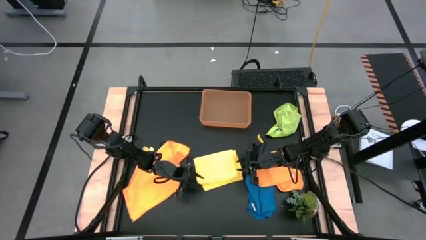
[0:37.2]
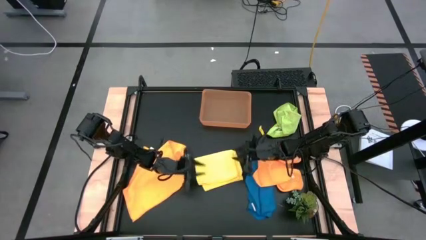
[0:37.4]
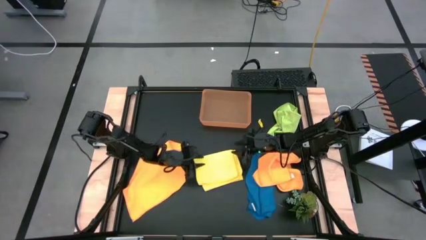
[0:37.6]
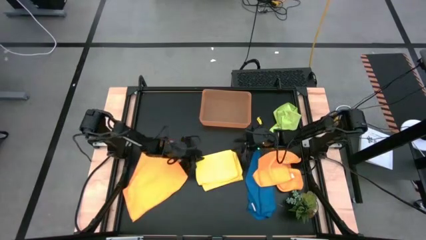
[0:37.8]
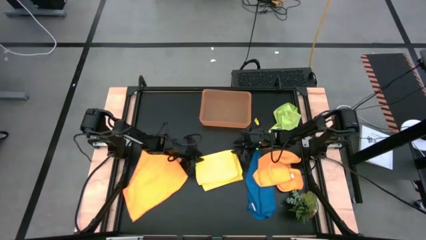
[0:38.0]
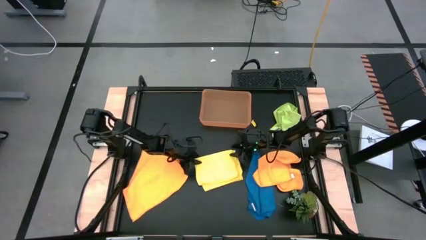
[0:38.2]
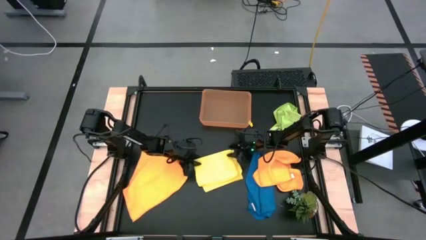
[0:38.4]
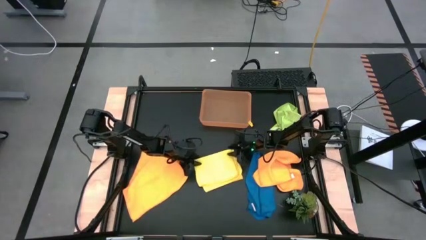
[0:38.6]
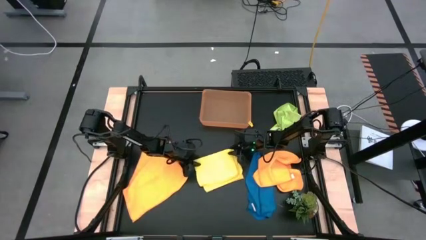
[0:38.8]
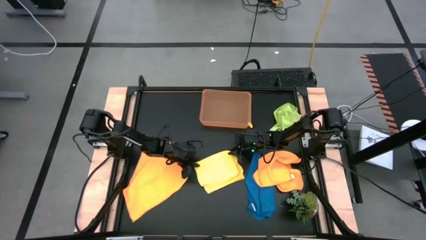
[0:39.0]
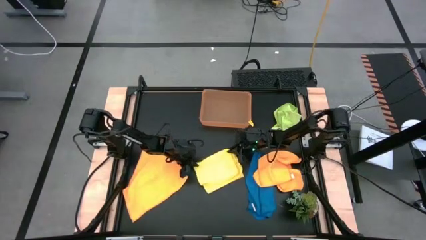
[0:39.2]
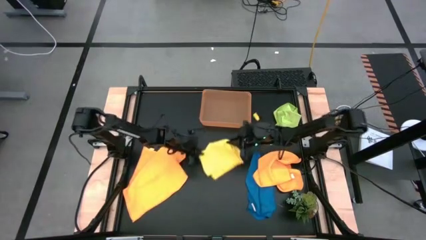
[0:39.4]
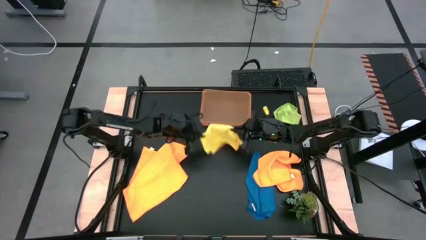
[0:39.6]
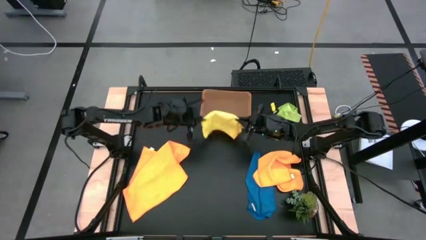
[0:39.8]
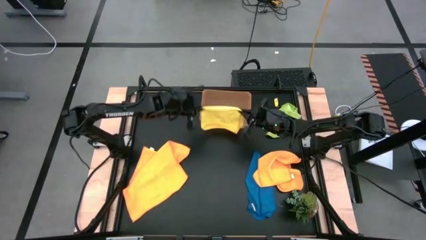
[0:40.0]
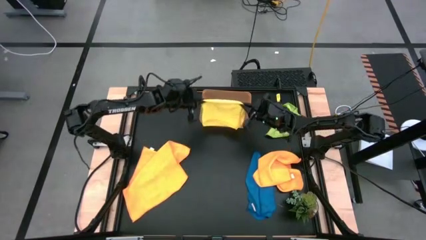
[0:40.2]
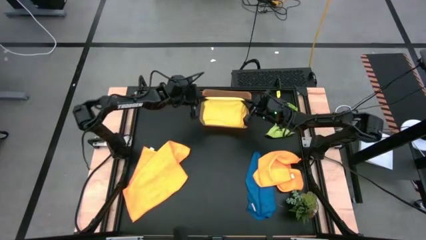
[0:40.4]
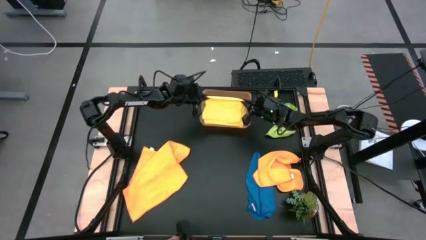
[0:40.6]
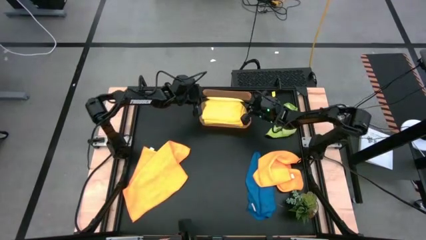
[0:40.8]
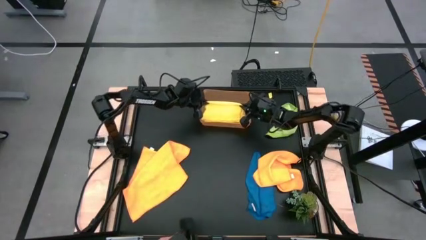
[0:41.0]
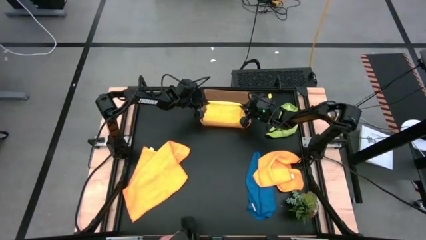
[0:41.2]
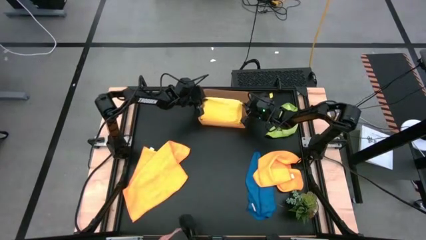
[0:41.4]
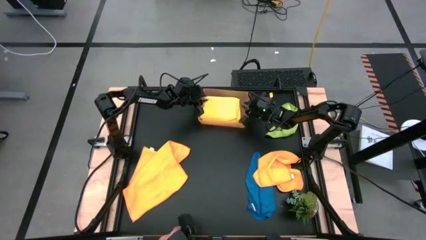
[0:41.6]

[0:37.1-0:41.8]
Task: Fold microfiber towels
Put the yellow towel in the orange bin

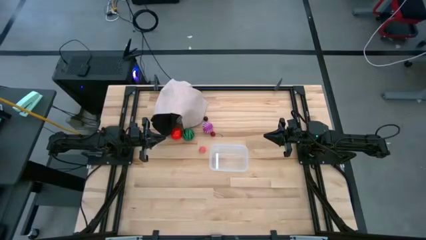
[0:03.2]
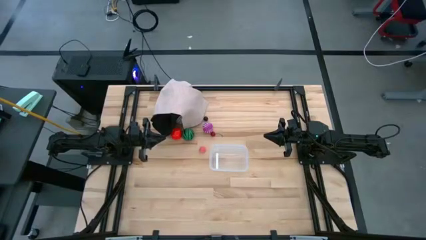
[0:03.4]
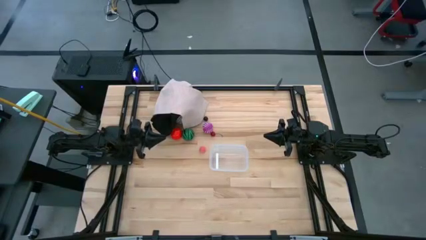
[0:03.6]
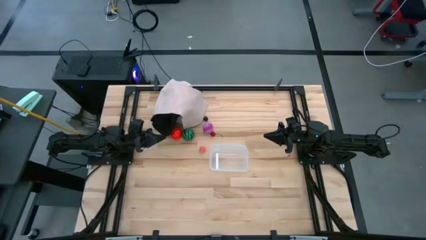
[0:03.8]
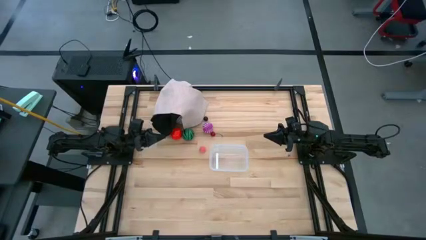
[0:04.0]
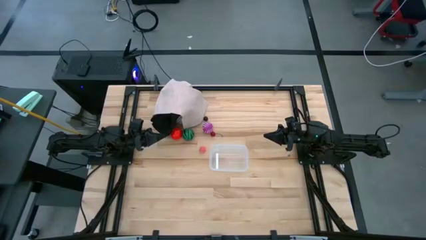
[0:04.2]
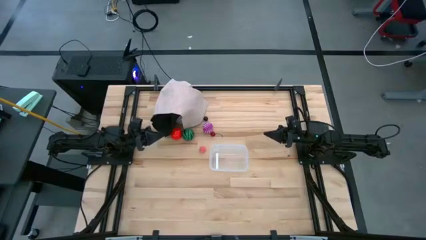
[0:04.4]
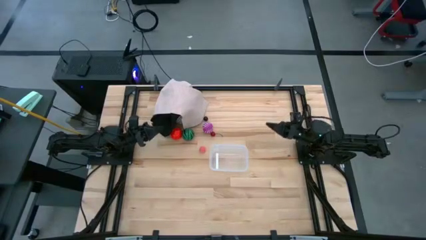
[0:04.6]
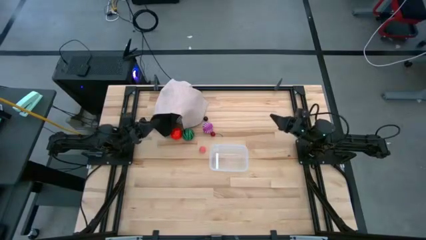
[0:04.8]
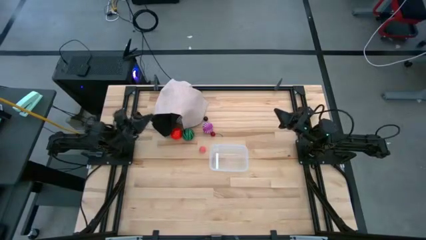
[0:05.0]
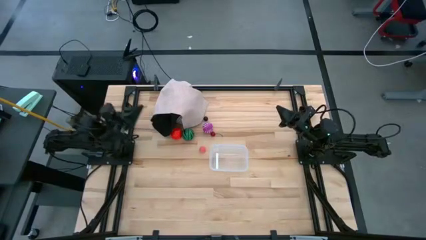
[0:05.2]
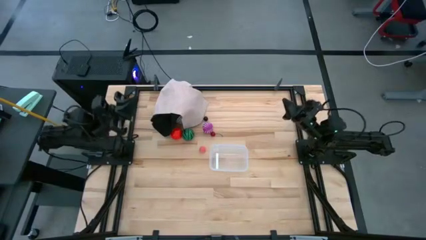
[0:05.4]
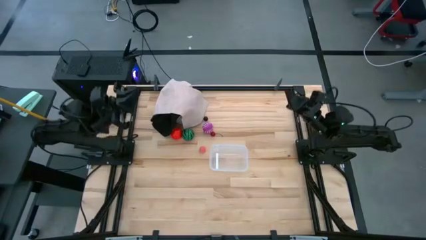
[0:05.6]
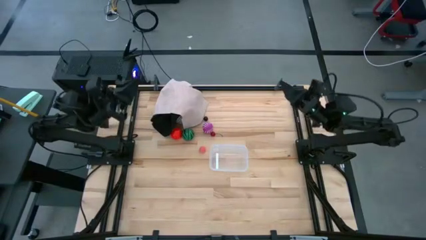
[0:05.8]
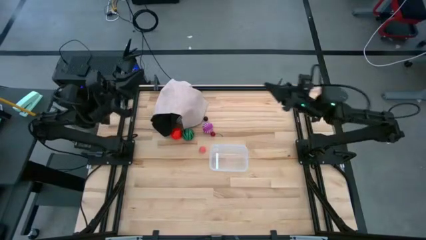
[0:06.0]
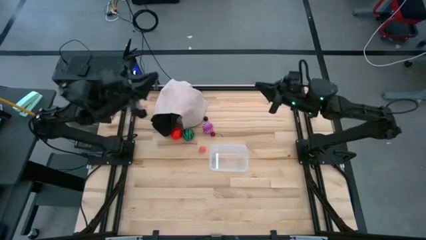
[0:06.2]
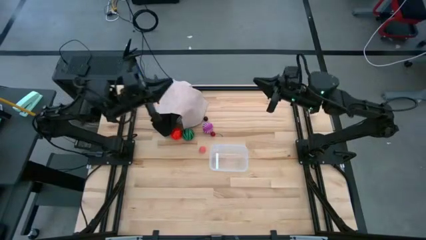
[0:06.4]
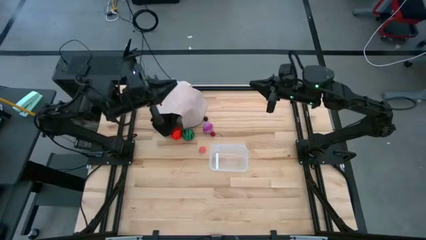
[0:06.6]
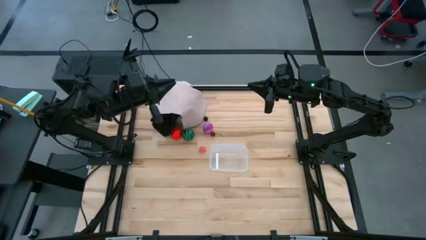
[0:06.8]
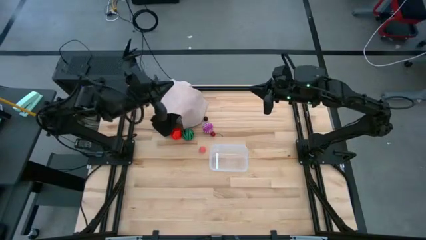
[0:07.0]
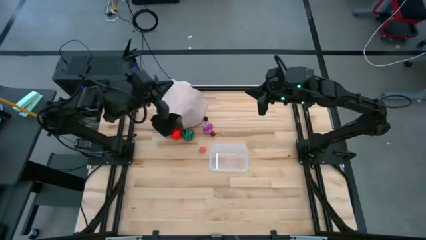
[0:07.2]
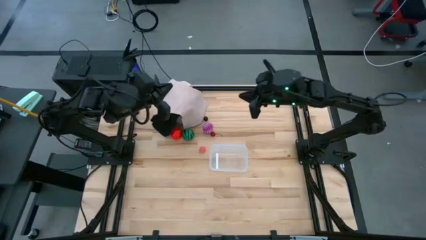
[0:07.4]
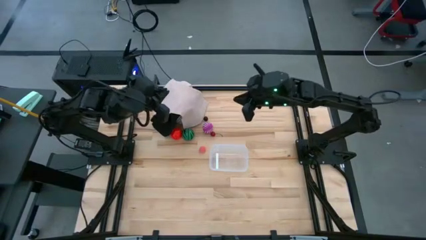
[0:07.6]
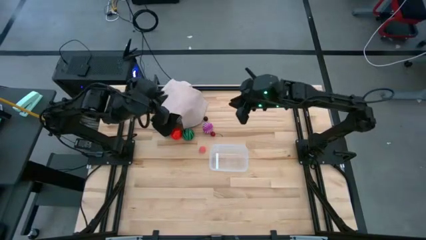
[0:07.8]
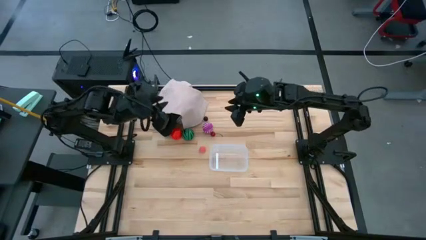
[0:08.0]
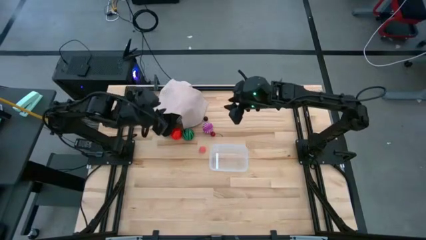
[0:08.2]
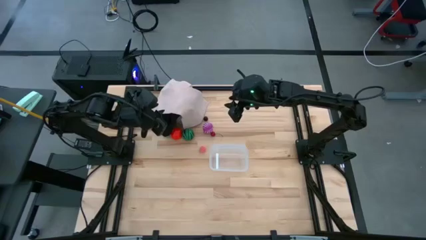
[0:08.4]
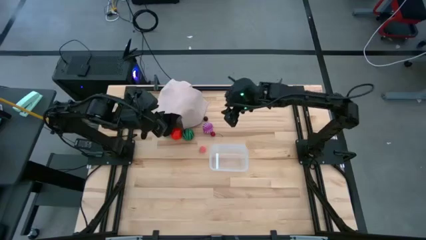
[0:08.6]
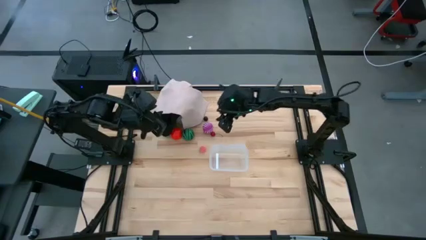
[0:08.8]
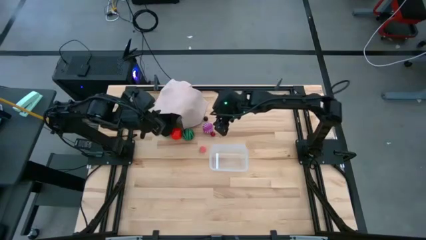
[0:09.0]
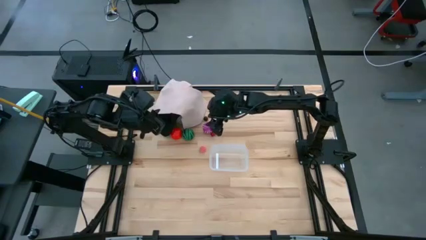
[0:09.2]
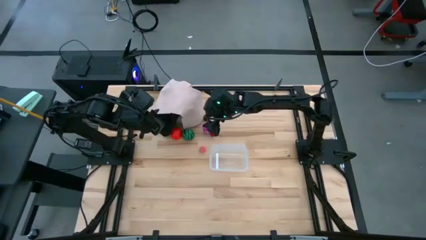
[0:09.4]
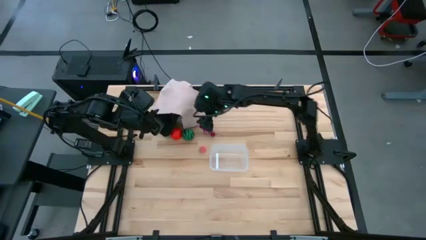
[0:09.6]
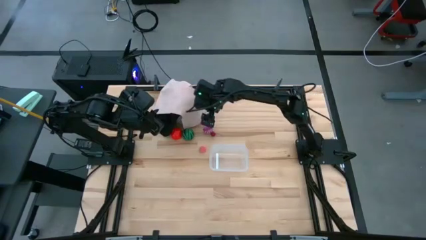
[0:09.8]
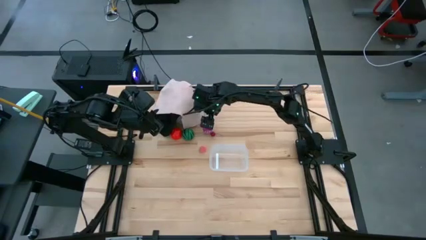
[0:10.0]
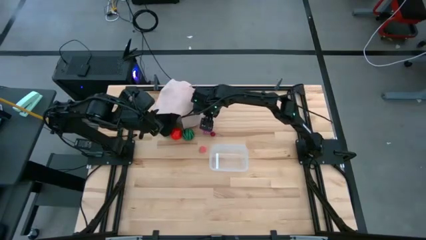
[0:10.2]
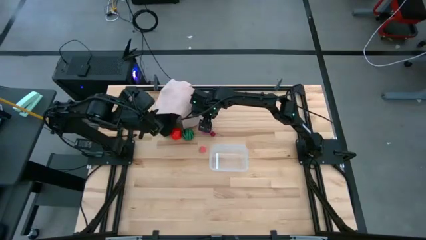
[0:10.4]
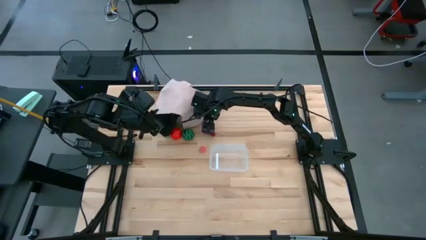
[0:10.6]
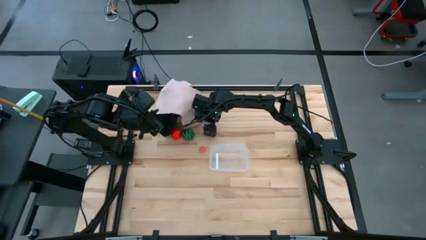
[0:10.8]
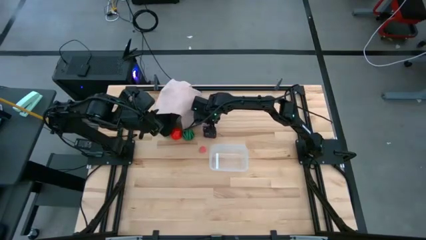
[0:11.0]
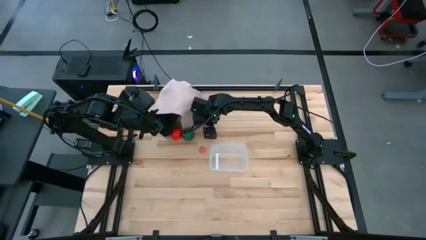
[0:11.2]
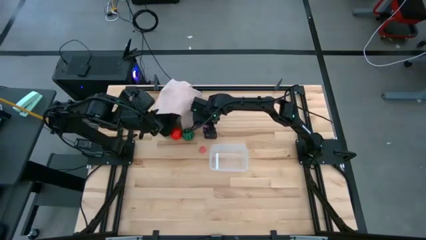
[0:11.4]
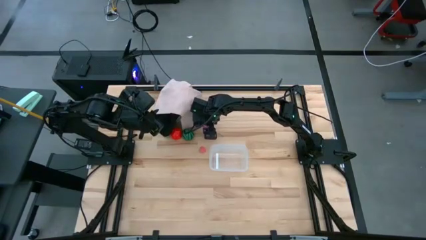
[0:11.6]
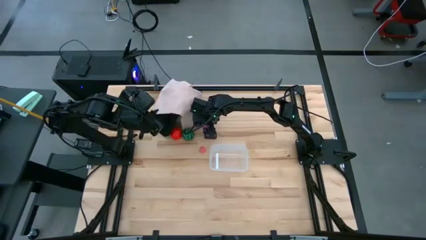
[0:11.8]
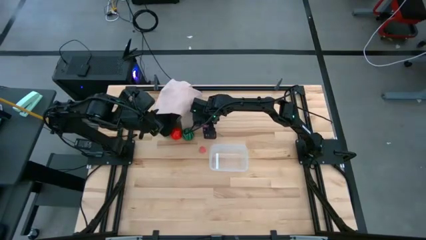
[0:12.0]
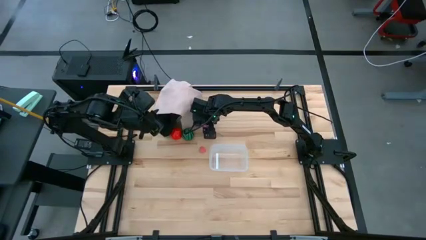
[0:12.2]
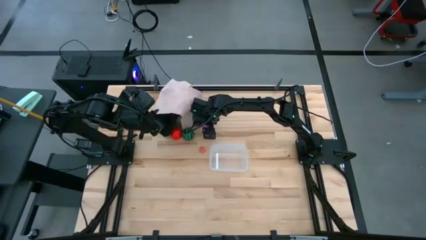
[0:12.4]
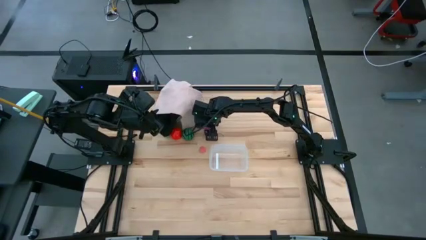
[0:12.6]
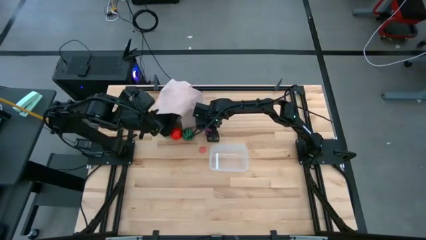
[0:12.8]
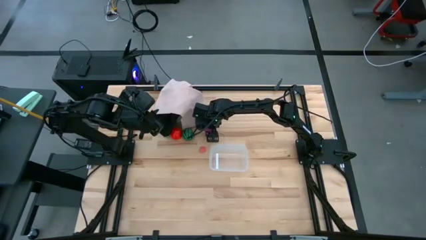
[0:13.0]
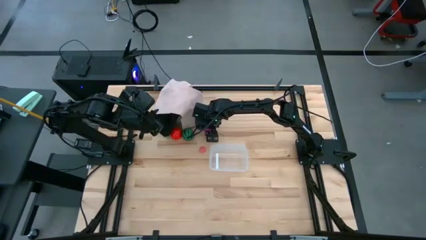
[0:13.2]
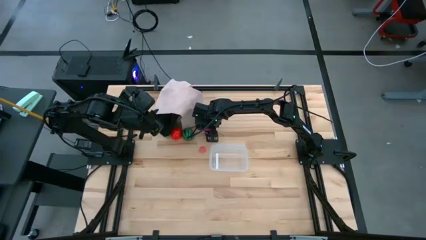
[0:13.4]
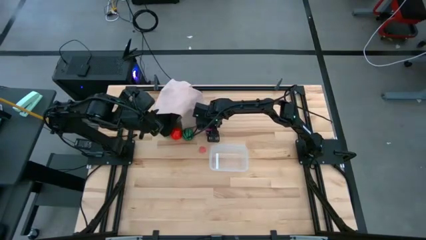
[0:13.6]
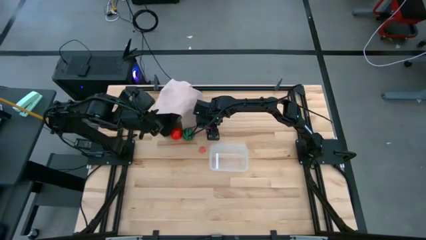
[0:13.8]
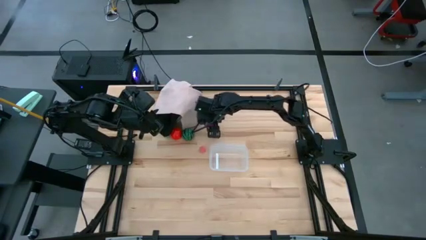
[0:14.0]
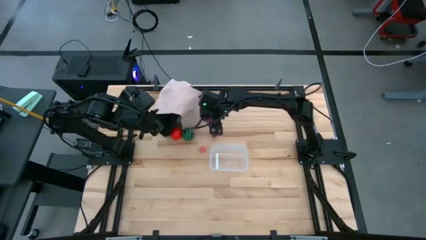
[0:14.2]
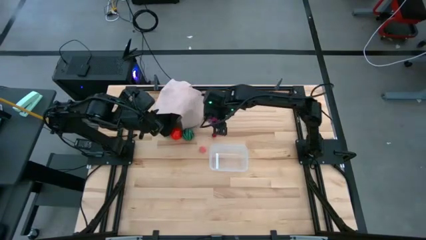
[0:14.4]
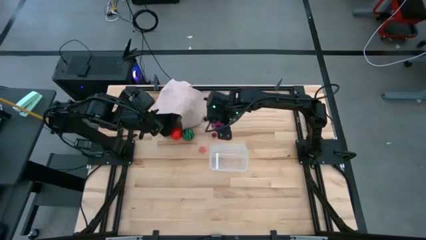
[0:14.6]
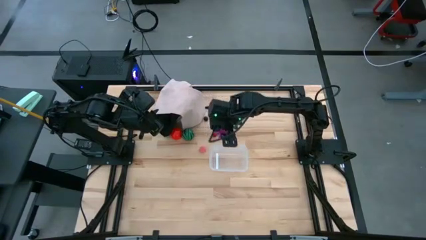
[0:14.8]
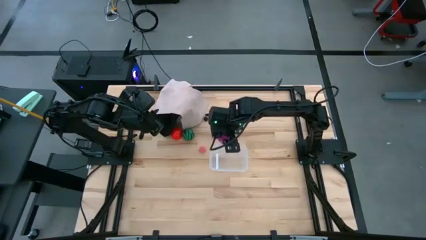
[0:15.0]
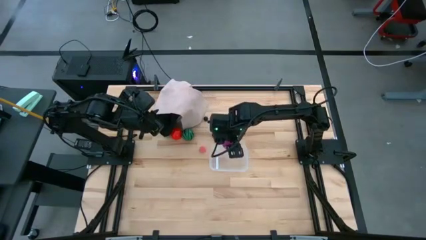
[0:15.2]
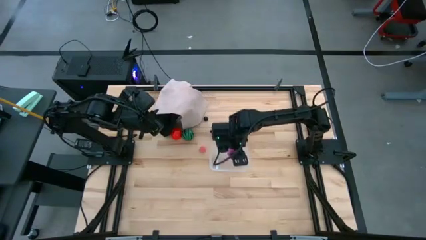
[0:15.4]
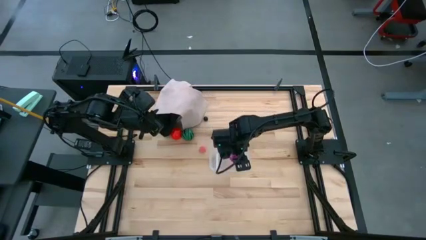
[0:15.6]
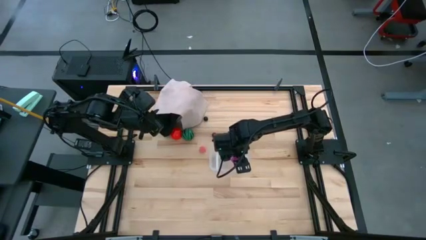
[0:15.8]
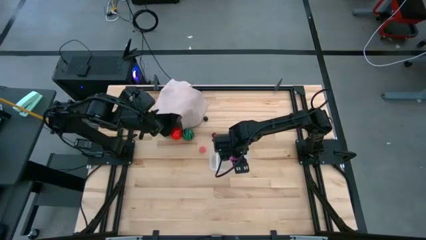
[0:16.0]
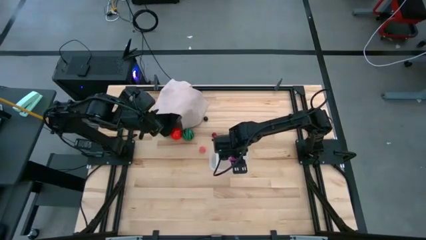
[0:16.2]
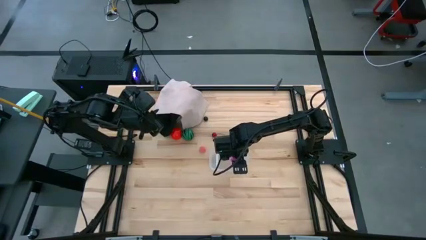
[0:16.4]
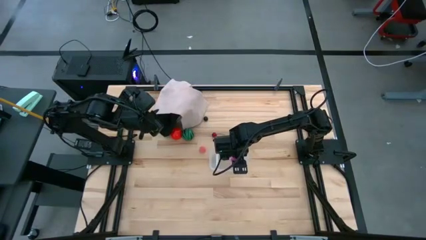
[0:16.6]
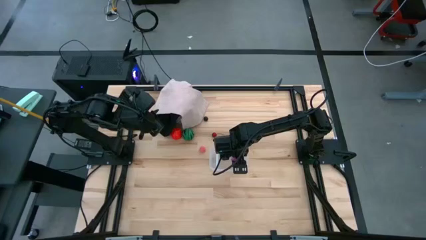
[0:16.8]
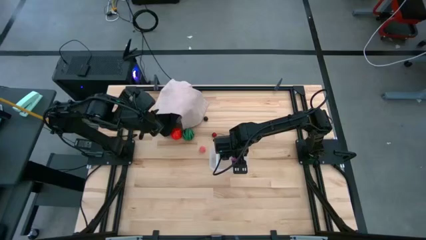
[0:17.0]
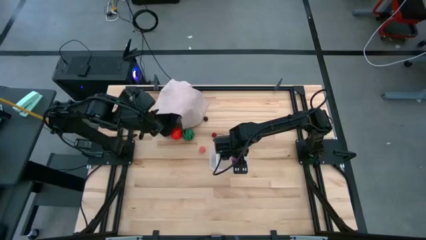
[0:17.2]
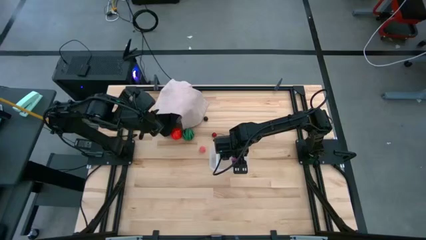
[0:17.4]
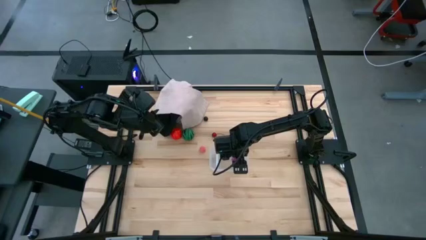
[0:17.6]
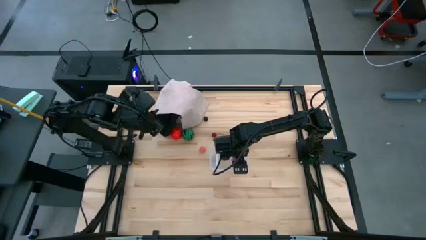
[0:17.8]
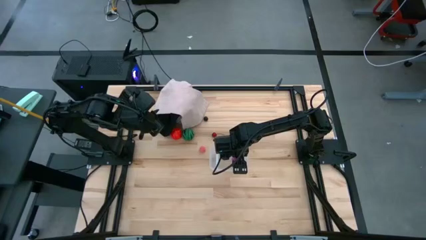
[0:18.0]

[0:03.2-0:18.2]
Task: Pick and placing Produce into tupperware
Put the onion into the transparent bin
